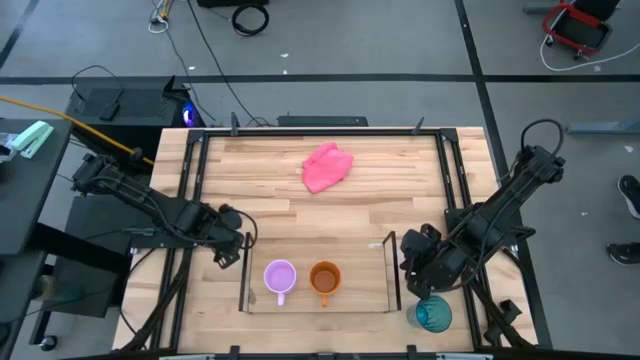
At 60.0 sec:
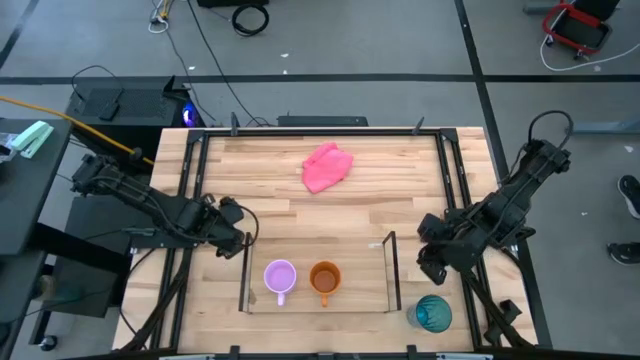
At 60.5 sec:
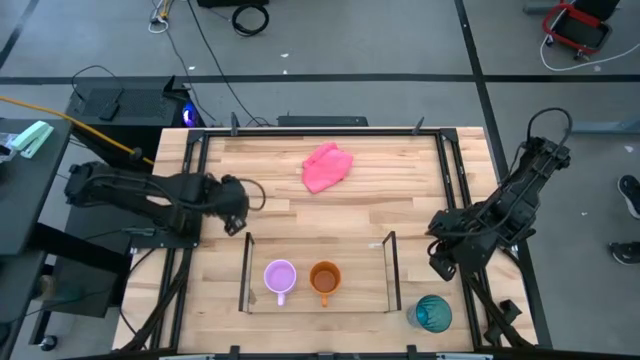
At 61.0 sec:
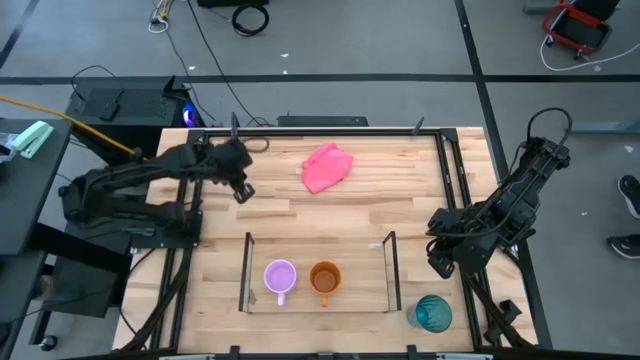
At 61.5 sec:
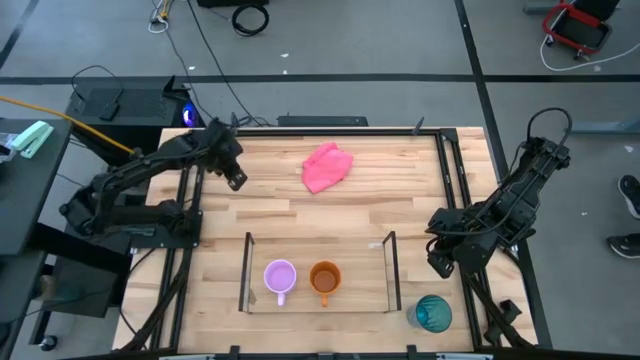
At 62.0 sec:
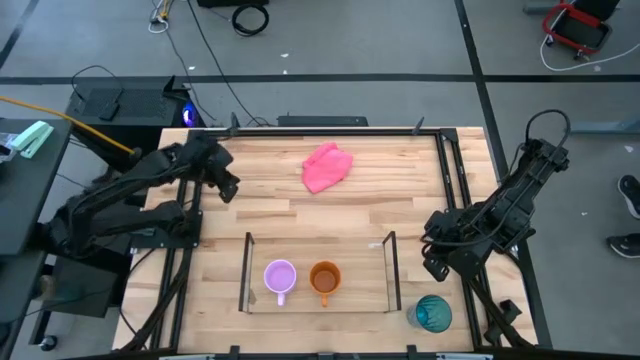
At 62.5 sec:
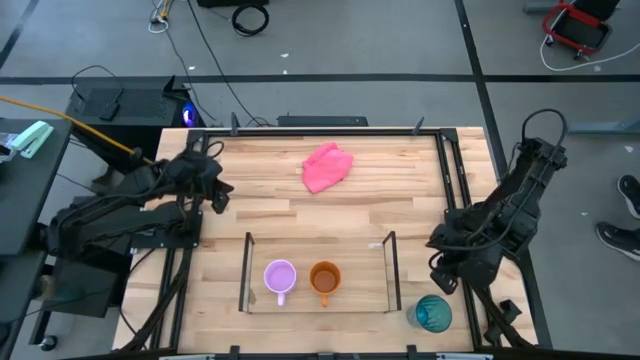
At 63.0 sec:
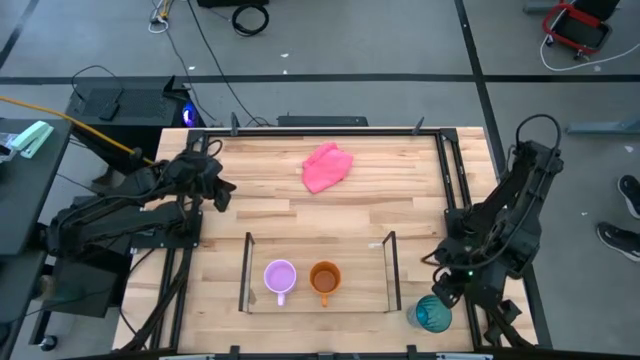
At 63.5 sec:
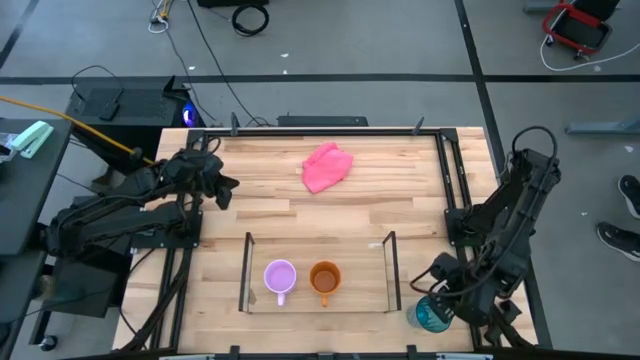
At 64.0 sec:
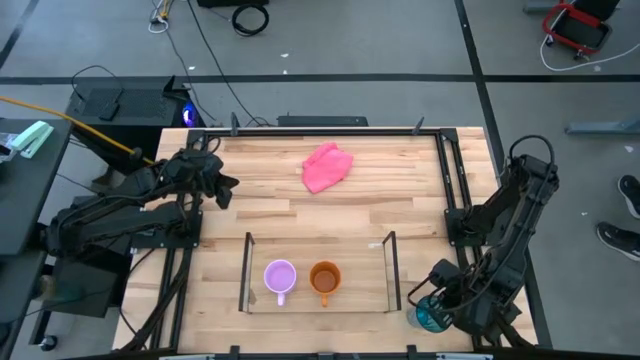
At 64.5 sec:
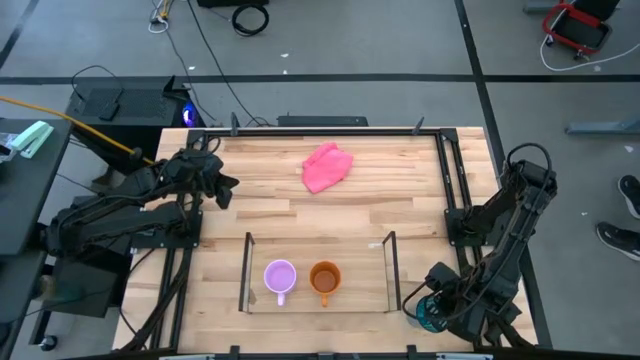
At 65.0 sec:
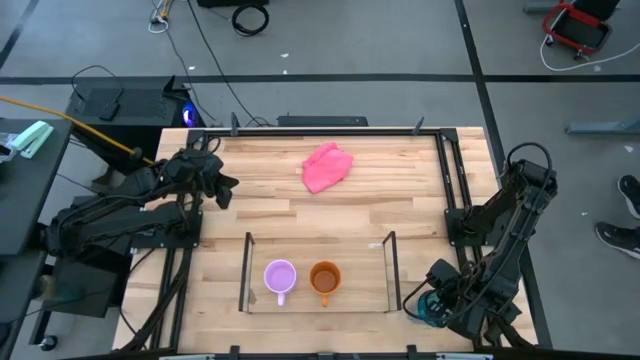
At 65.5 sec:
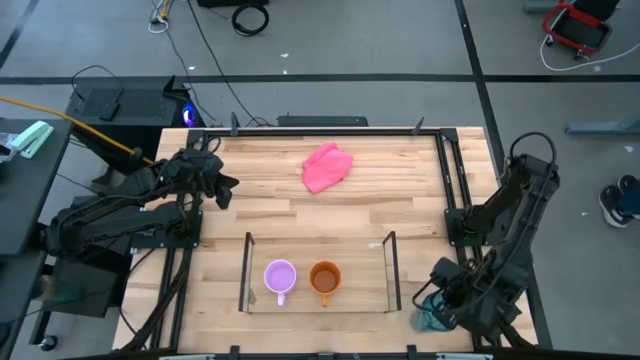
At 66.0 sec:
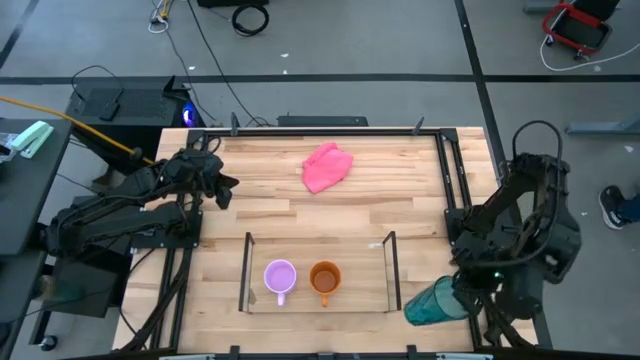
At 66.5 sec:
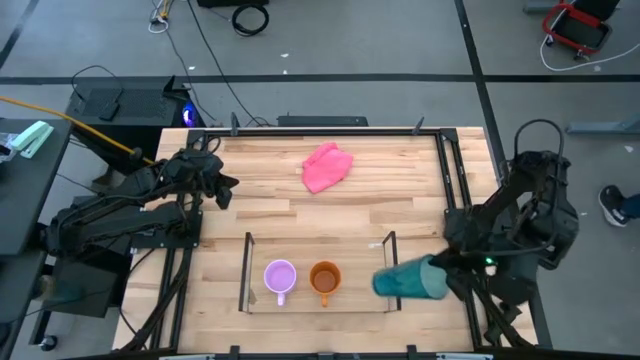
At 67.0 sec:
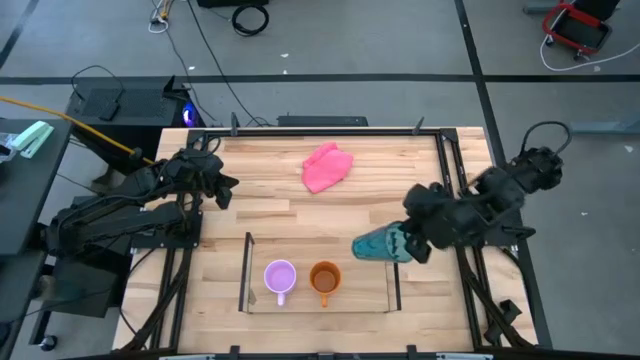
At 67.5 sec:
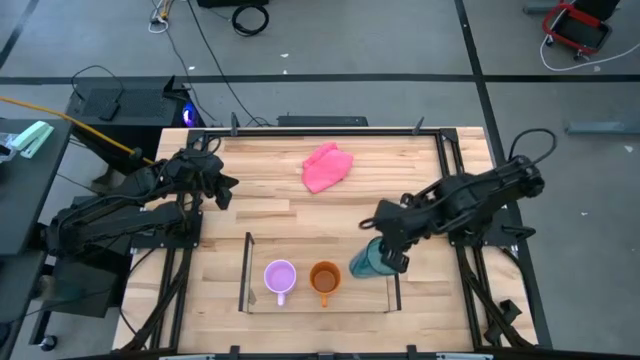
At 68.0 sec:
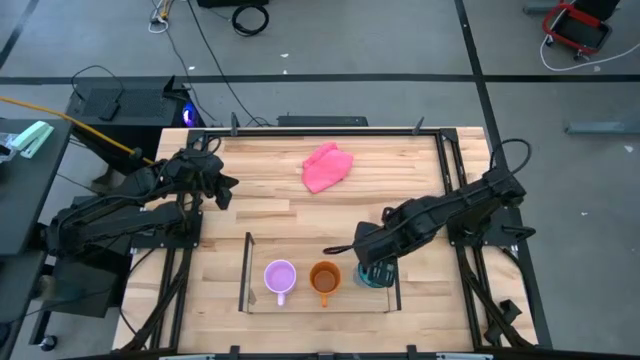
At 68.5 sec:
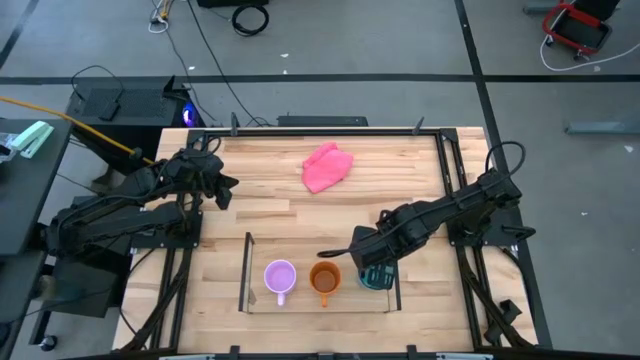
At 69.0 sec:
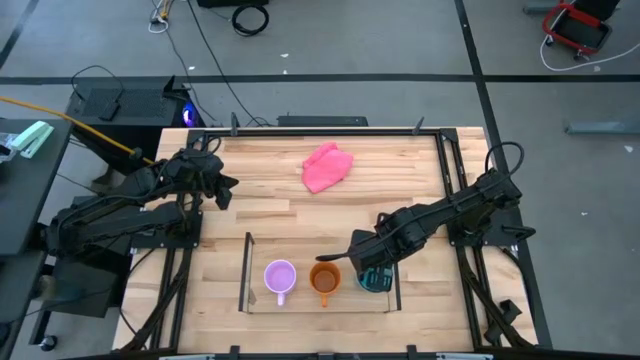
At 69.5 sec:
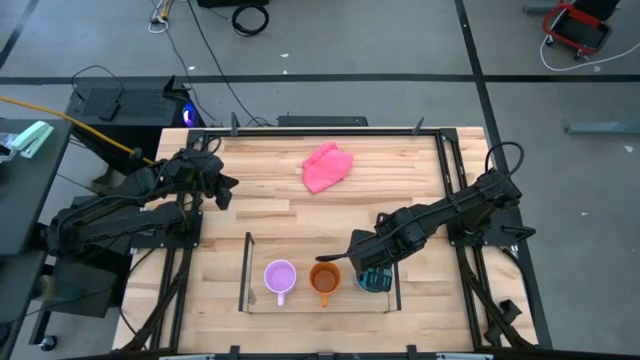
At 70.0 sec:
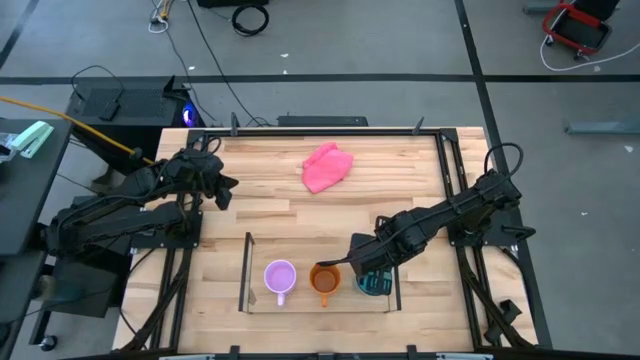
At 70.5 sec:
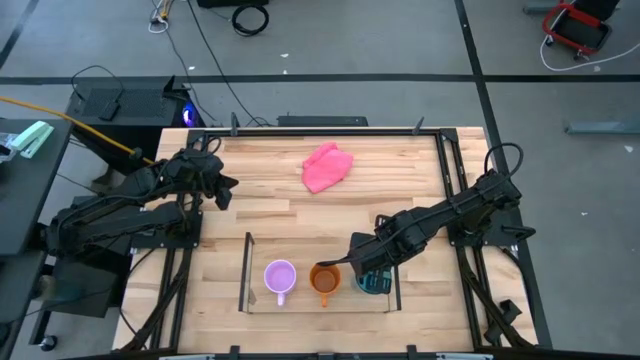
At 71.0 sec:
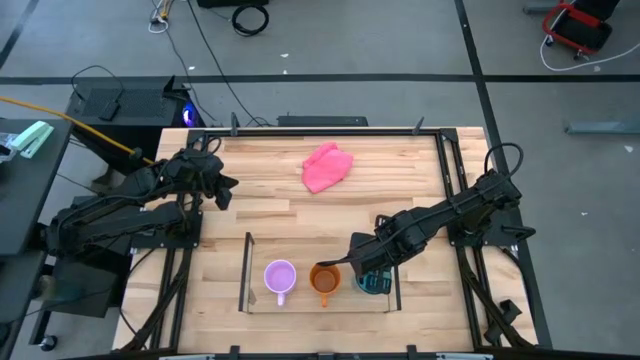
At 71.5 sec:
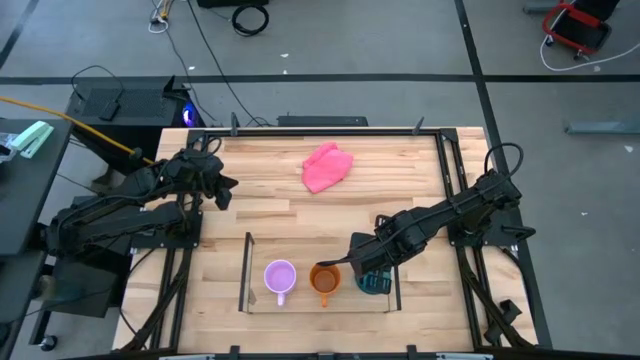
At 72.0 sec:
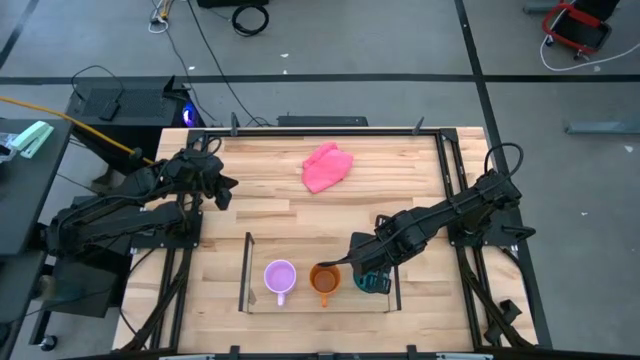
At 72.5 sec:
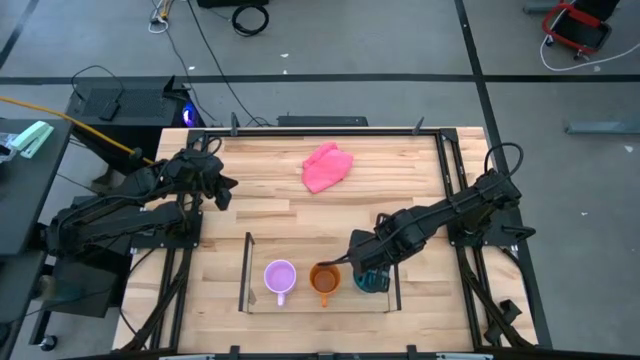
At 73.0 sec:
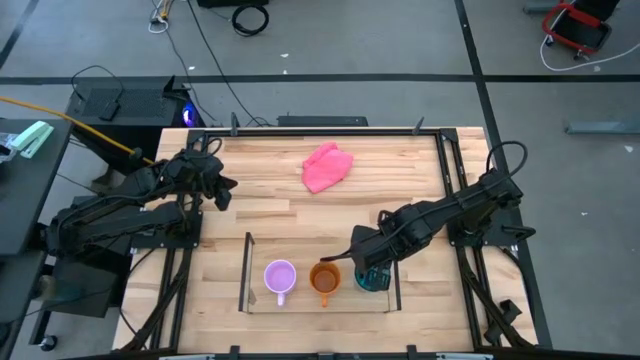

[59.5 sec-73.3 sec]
Task: Stack small to large cups/mugs on shelf
Put the blue cup on the shelf
